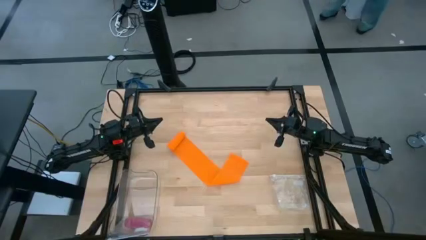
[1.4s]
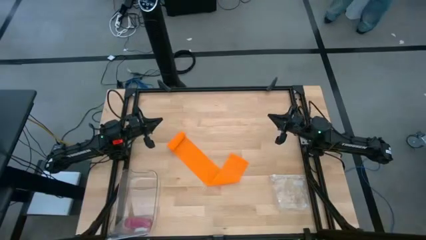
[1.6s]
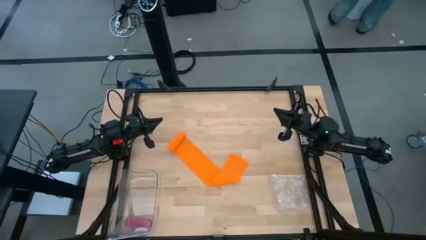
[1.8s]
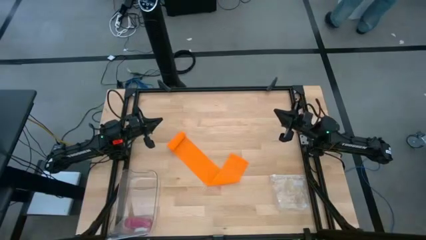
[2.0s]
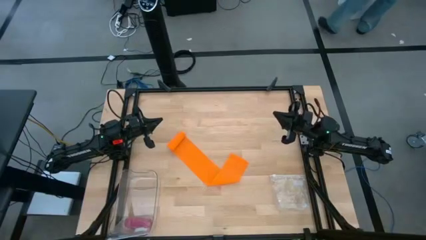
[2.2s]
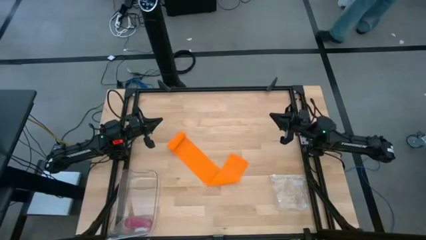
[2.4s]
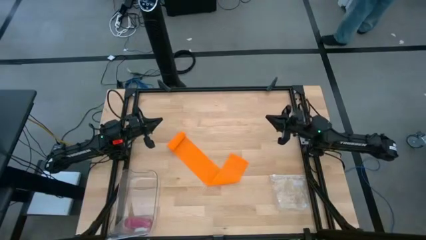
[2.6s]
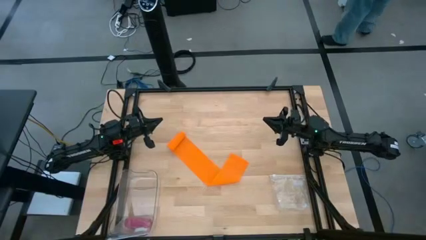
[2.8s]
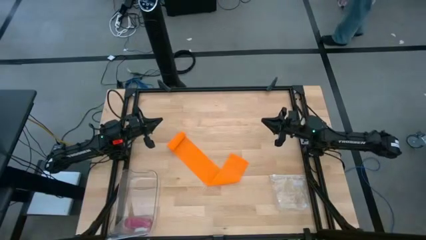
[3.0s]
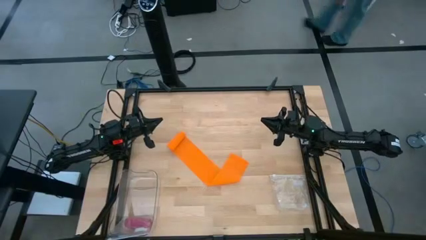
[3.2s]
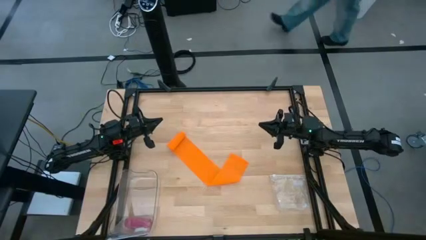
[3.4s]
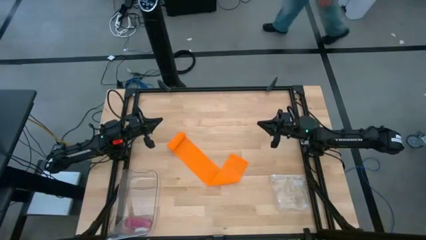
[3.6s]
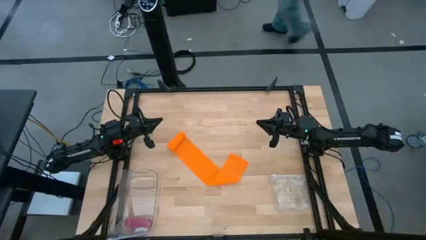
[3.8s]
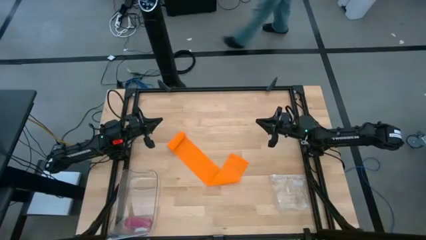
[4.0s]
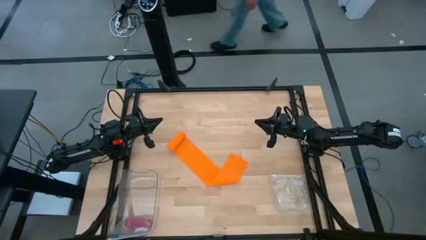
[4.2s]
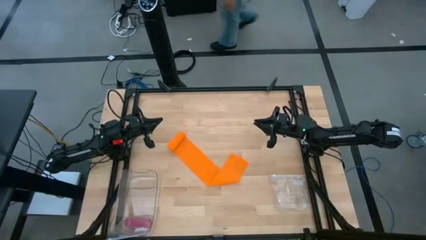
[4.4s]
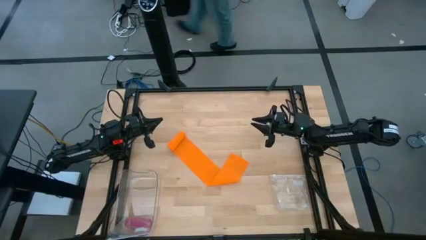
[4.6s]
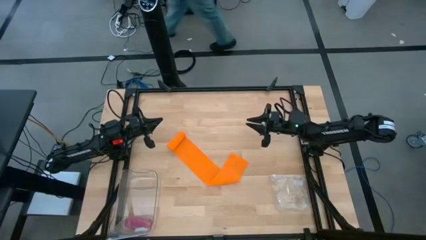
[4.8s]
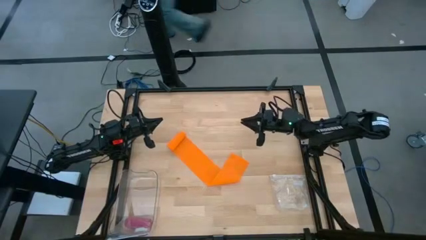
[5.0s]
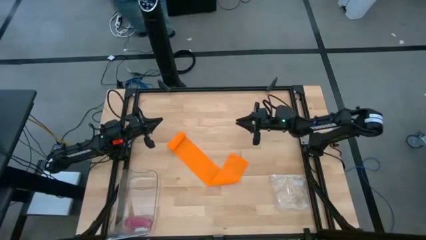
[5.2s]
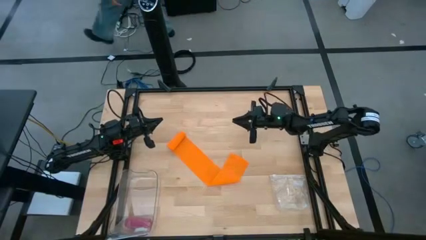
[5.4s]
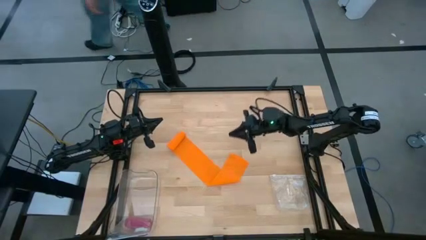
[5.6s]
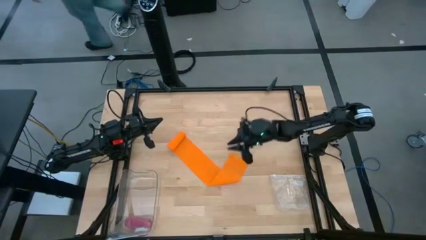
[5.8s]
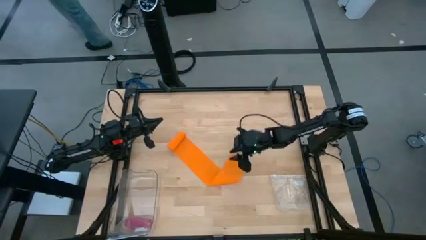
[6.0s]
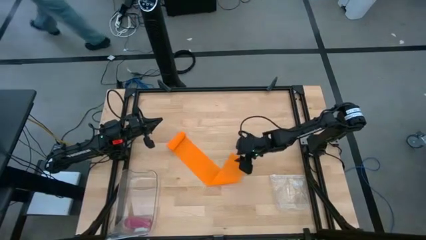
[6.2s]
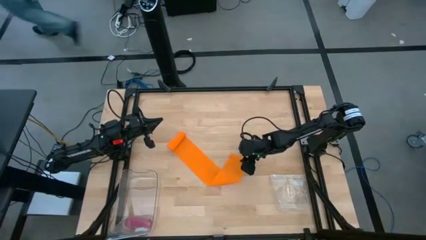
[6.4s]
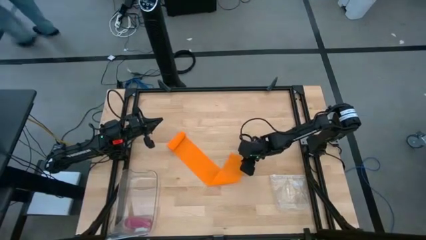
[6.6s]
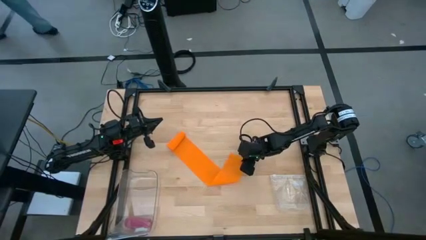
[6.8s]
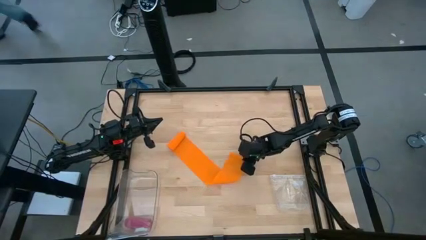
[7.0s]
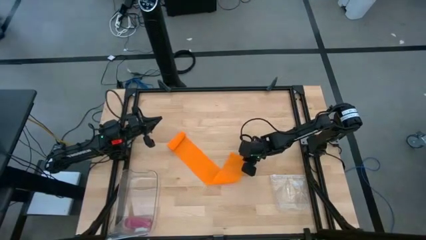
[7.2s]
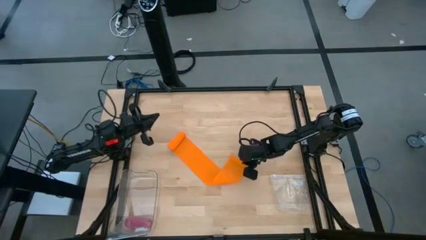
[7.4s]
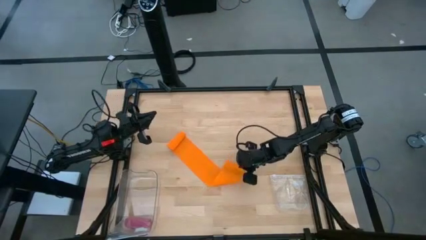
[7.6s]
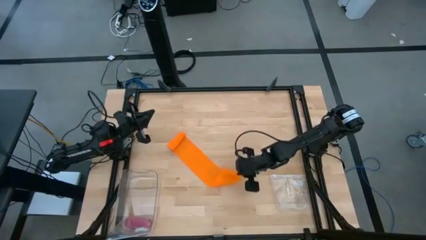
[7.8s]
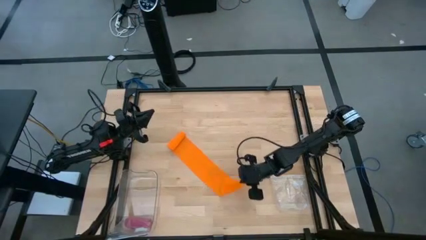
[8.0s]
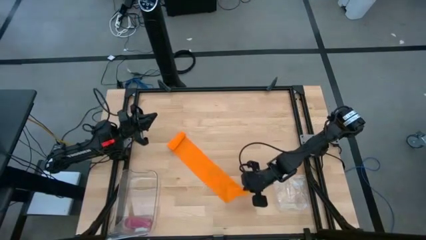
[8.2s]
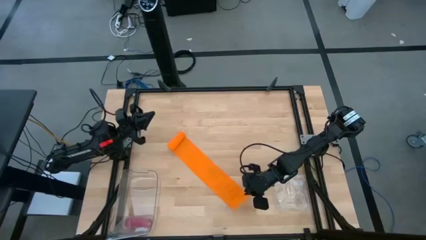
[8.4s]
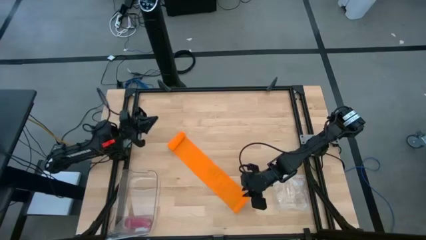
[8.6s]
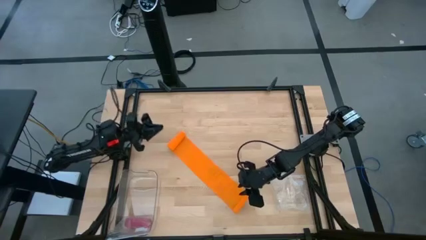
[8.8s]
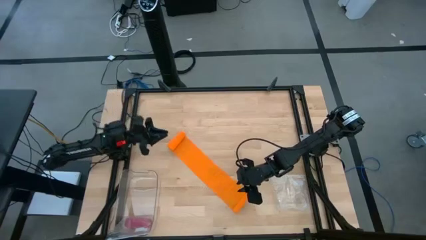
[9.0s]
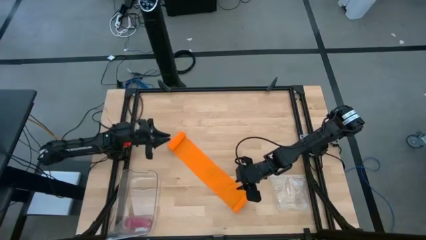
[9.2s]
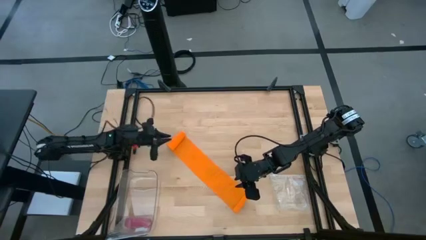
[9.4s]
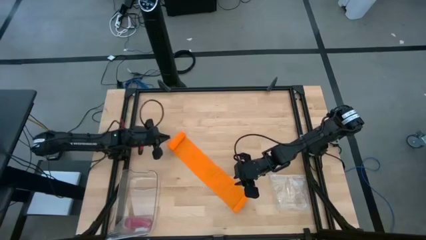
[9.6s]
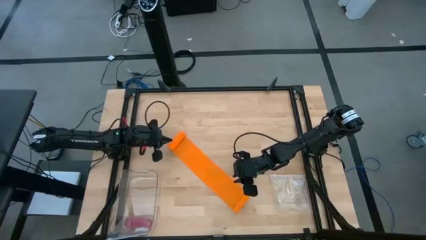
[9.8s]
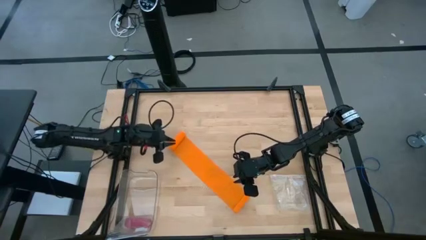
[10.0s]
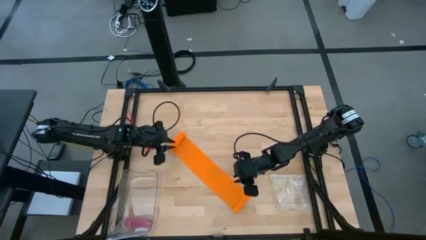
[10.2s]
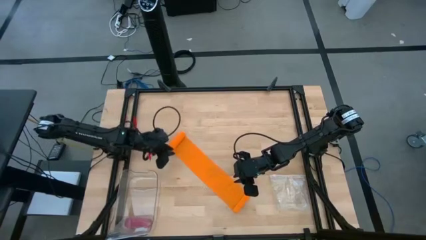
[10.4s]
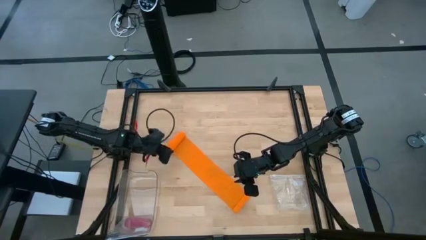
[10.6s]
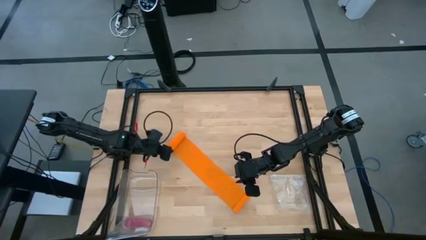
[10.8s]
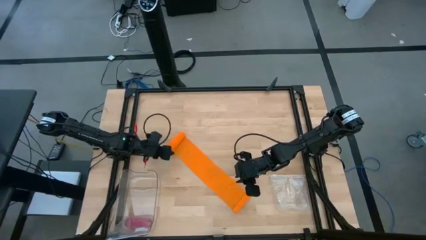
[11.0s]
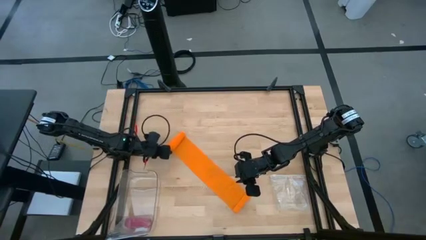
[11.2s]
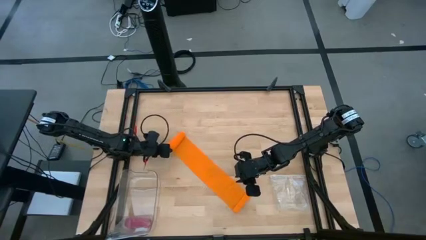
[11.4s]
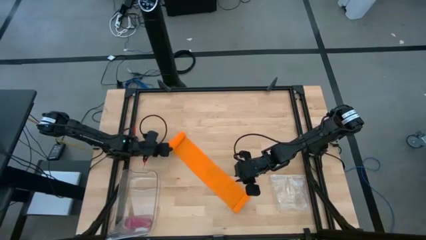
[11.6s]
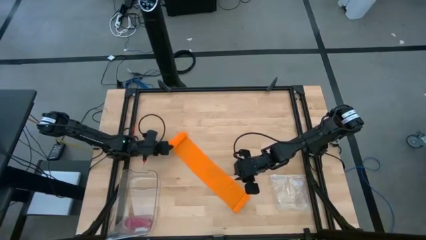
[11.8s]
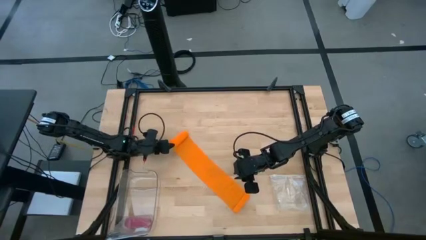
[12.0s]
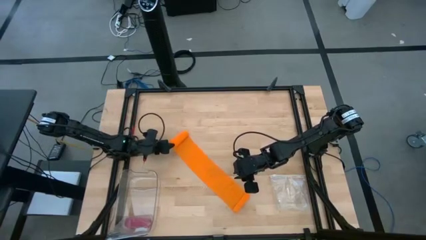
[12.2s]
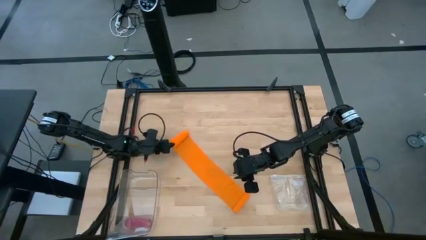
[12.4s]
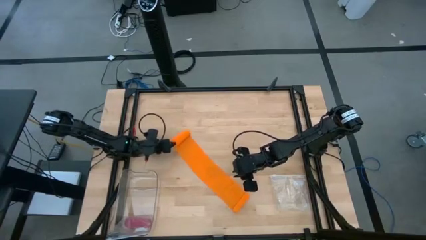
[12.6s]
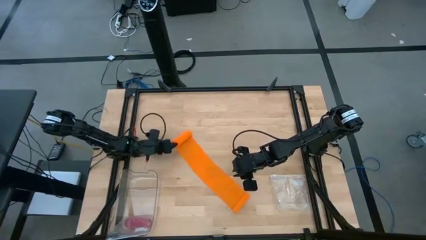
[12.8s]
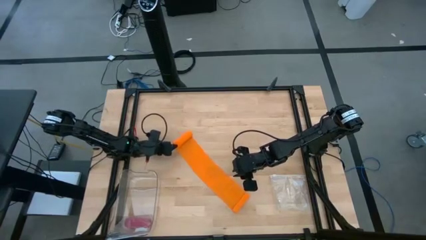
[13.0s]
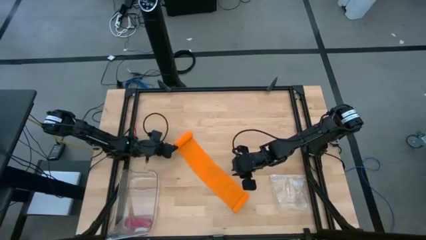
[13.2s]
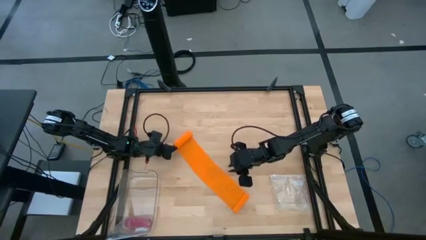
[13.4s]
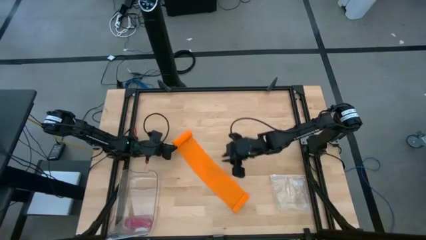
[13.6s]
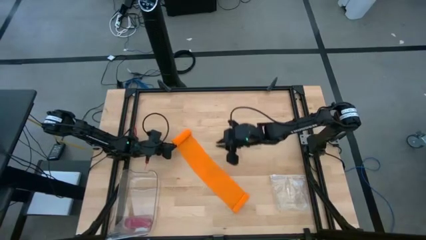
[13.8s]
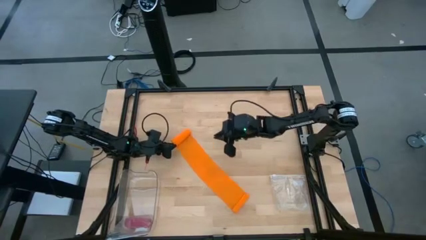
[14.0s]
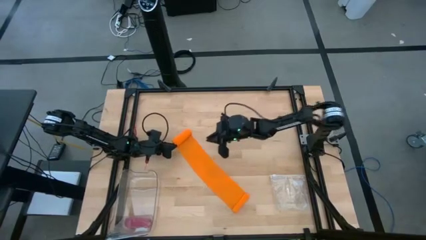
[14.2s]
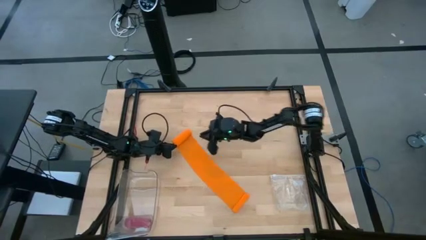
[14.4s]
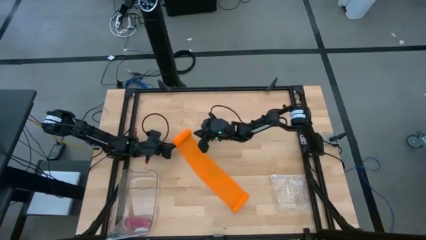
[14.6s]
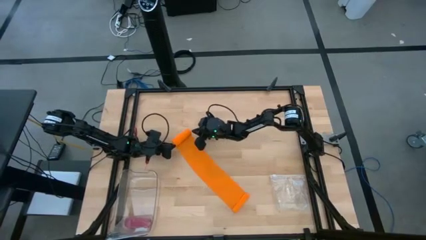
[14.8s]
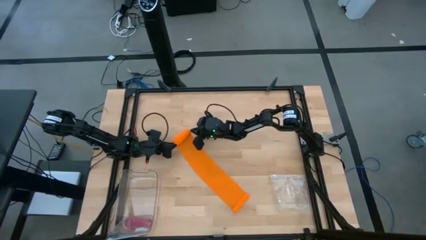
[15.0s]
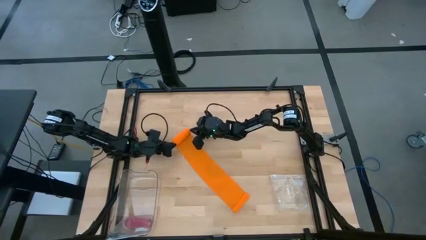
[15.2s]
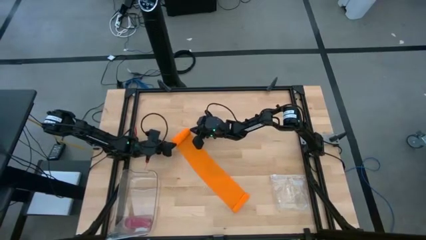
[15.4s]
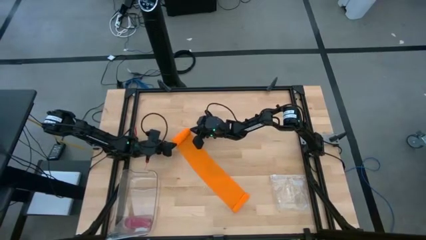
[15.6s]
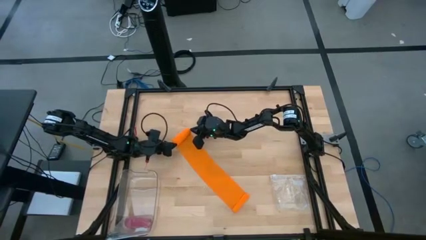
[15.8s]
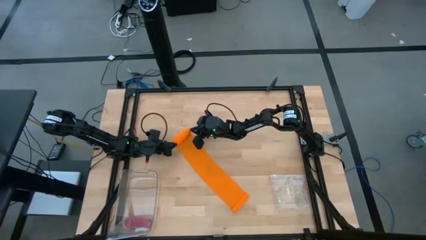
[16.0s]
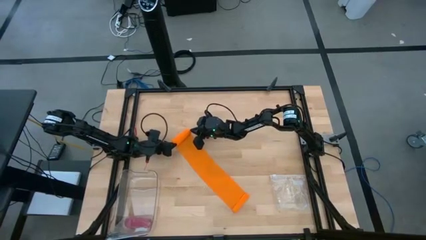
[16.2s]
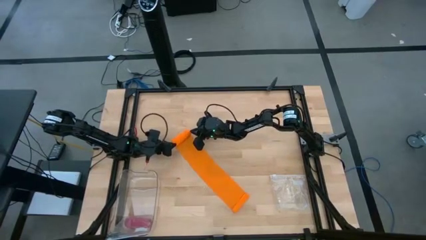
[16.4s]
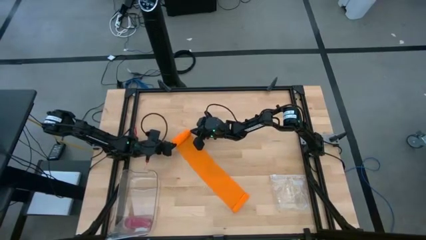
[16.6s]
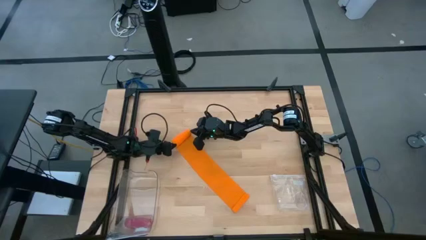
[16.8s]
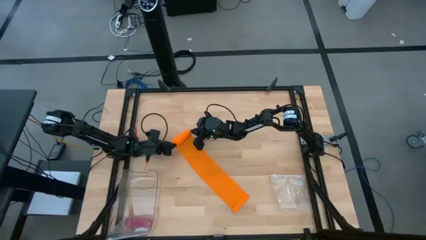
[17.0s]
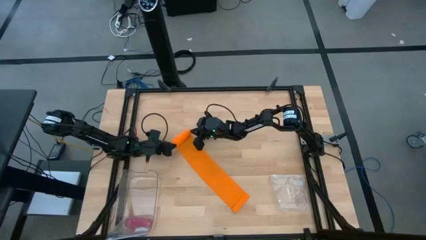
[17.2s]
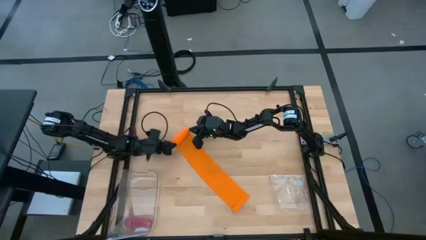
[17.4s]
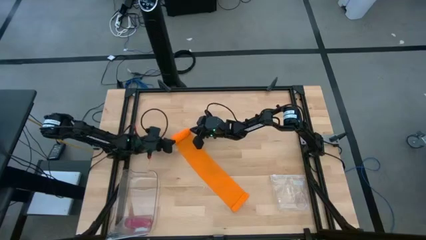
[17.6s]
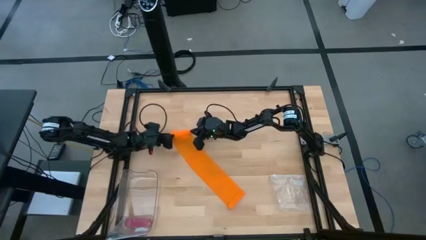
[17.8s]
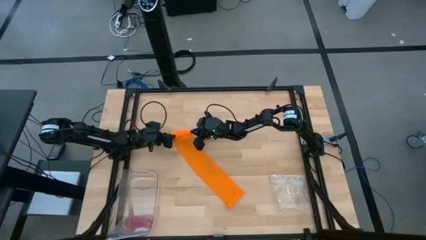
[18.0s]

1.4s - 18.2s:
Task: Roll bandage
Roll the orange bandage
